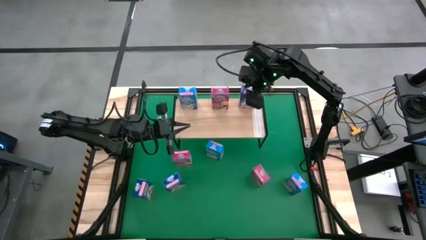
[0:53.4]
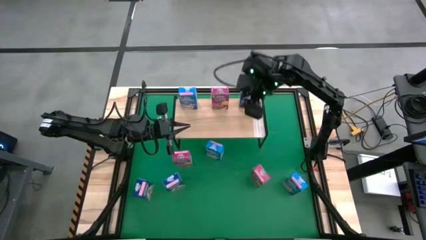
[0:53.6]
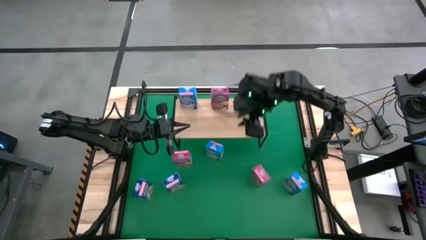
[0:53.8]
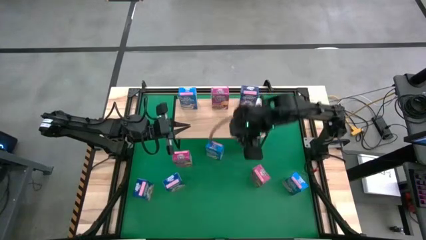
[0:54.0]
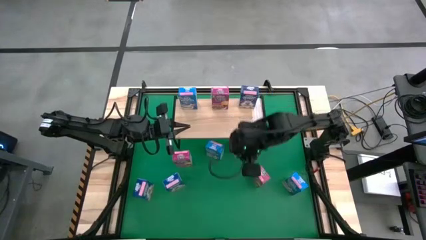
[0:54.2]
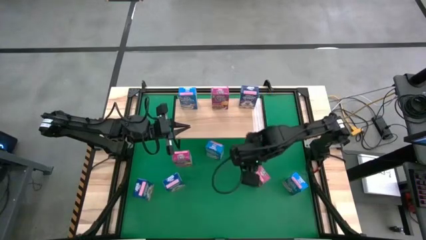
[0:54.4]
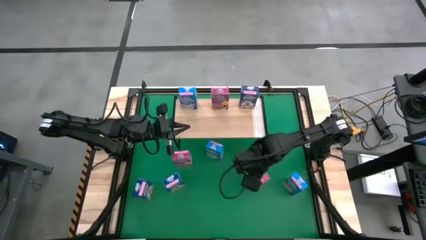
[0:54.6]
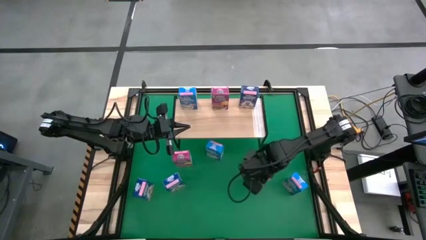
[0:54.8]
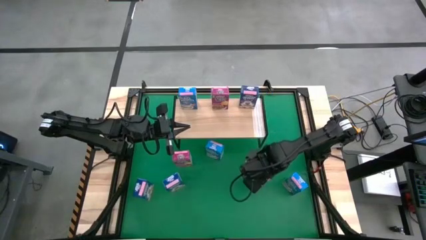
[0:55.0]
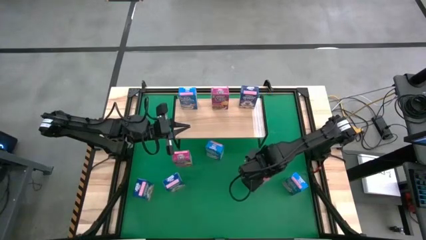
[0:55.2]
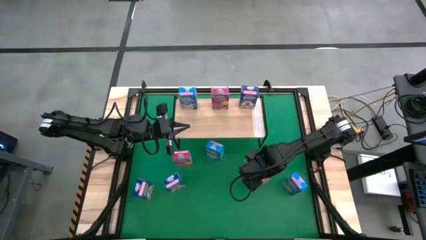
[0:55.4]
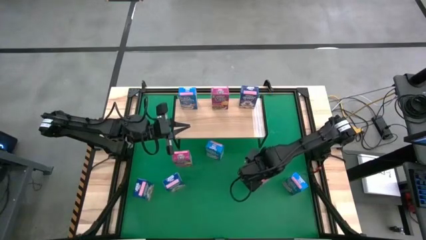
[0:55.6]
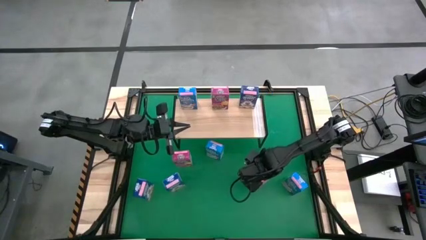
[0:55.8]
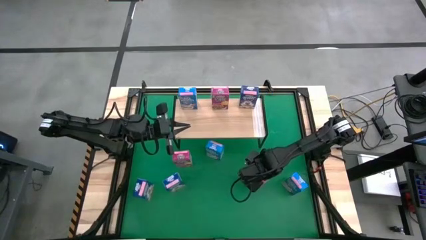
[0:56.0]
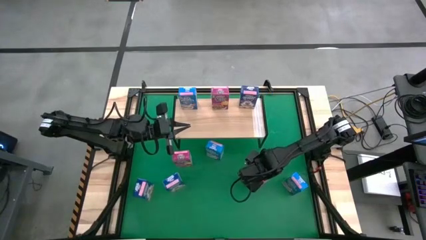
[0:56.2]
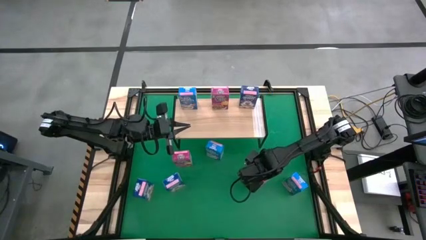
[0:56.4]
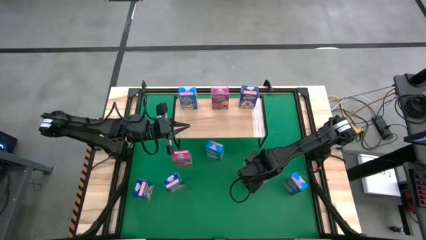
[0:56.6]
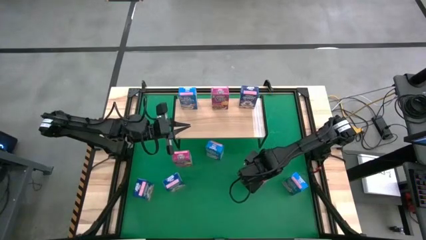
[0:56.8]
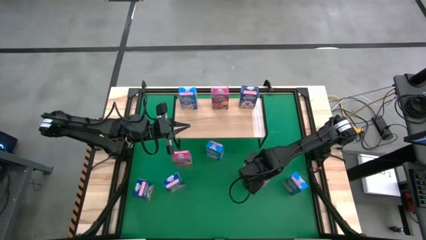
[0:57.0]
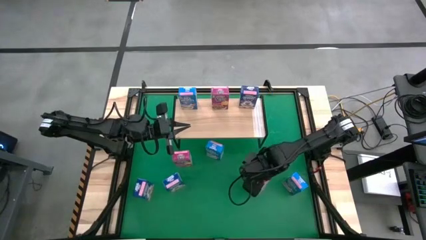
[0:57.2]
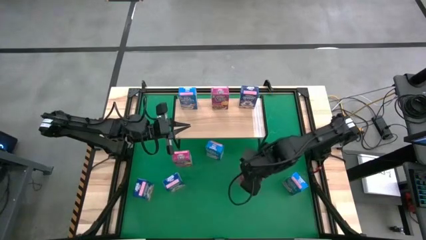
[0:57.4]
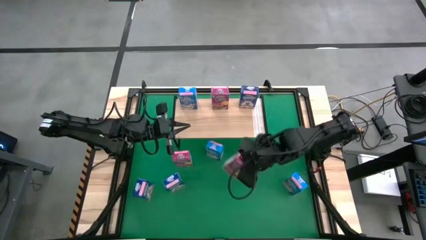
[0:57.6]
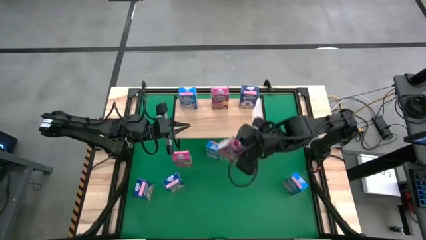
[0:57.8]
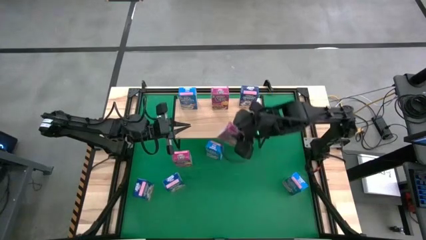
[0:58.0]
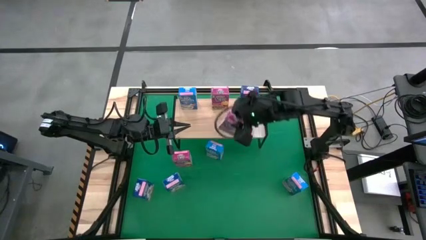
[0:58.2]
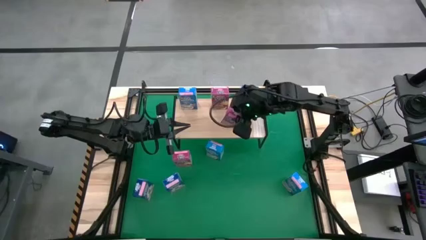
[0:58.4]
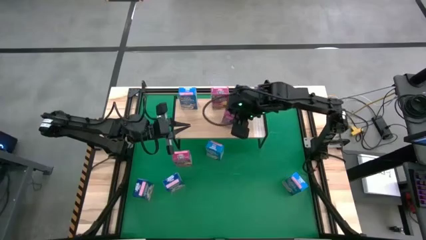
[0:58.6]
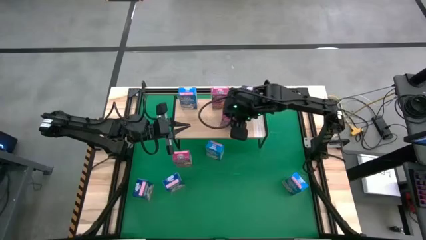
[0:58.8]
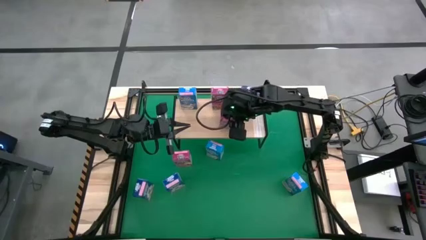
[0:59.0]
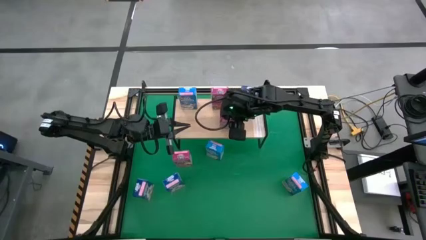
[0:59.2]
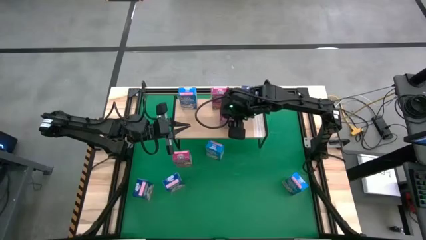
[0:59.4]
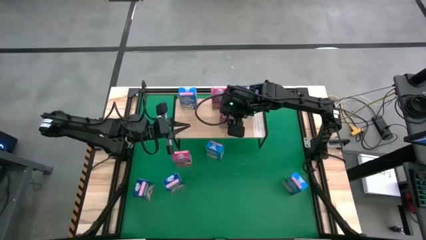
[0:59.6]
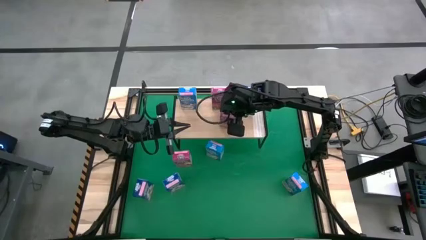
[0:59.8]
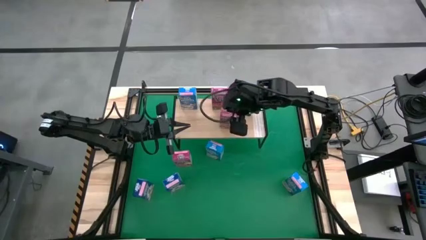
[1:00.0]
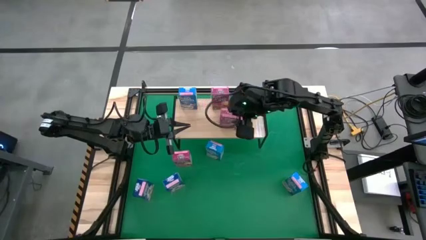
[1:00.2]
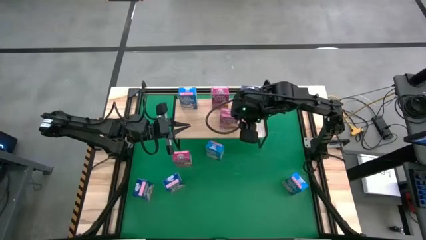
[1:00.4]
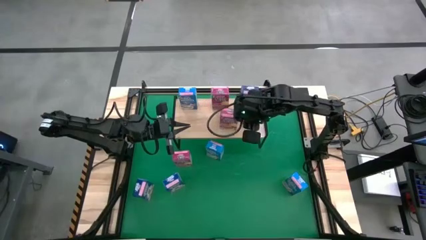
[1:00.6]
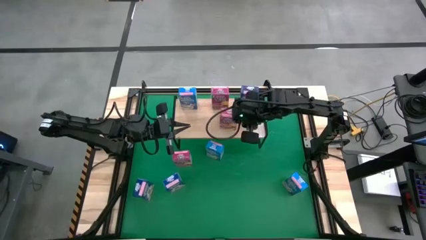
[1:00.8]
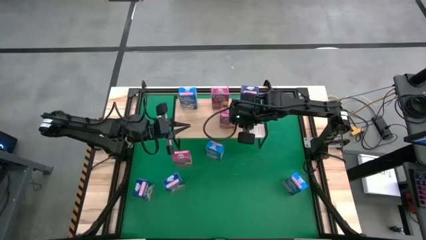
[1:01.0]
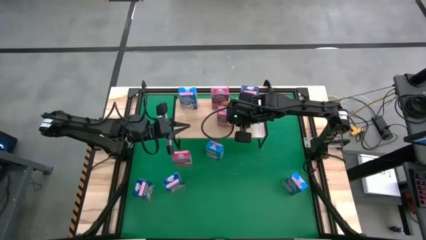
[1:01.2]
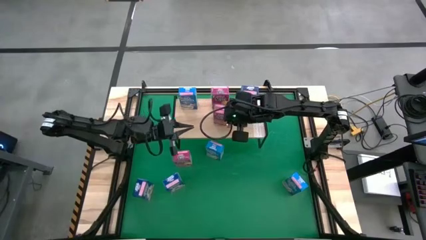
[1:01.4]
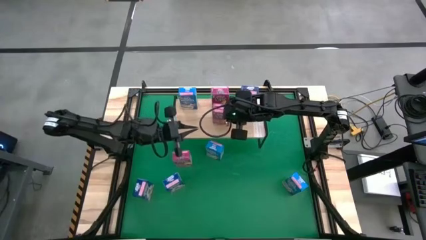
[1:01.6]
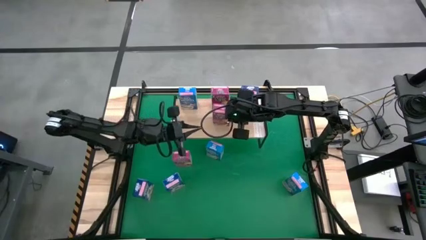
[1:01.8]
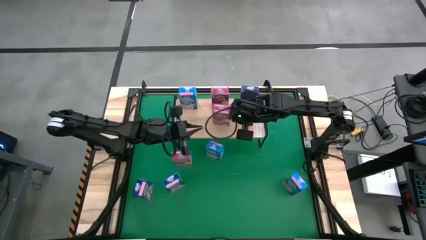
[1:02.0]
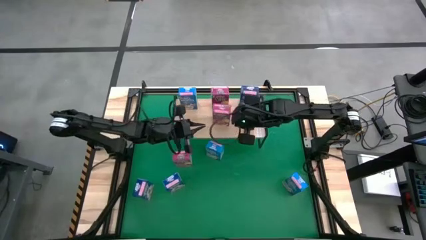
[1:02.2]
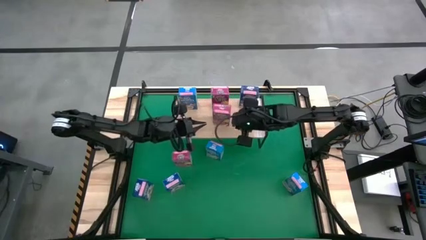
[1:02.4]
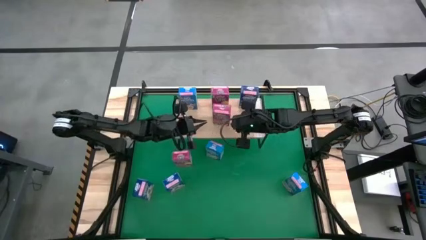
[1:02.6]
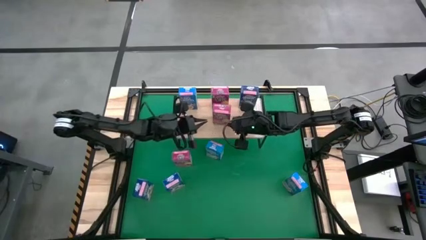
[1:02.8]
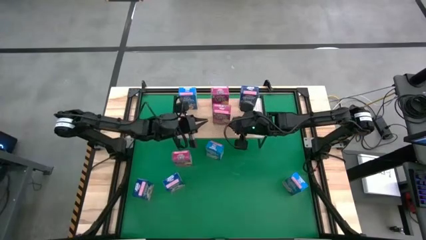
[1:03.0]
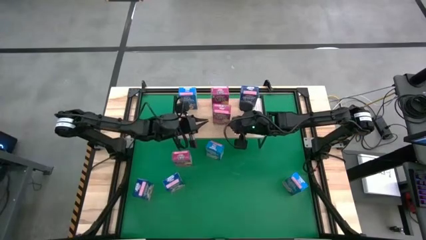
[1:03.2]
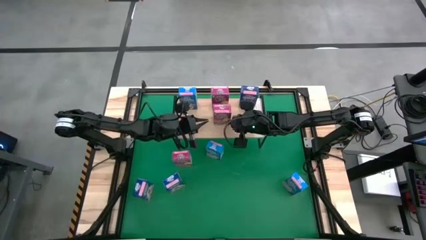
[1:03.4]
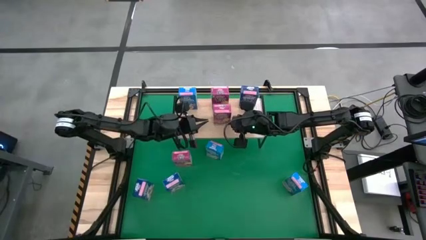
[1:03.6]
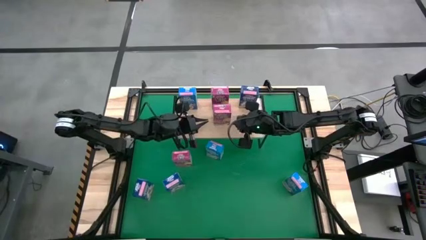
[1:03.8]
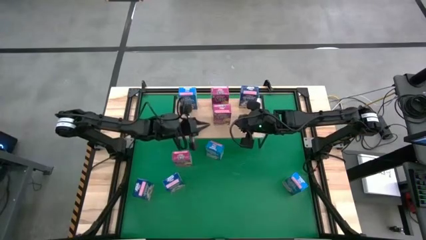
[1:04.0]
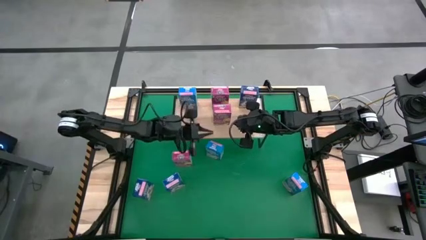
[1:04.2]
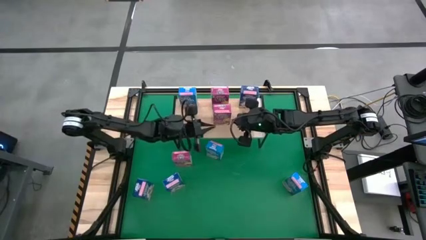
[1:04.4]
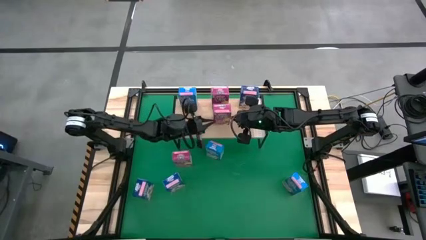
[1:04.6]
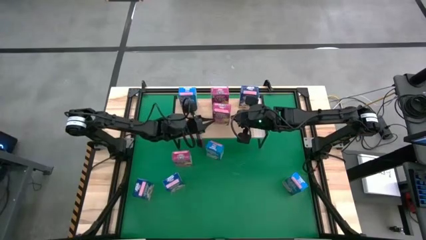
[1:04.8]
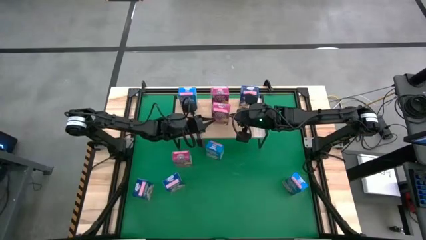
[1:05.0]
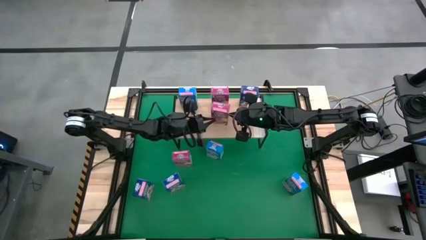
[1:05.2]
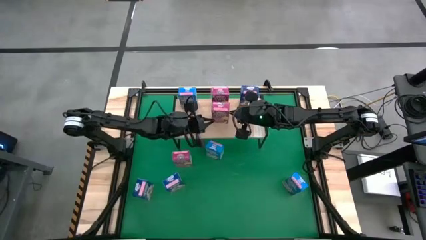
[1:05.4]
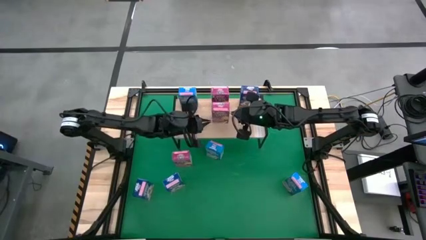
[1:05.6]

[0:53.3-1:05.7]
Task: Stack cereal on shelf
Put the right violet cereal box, aligned with the other violet cereal box on the shelf

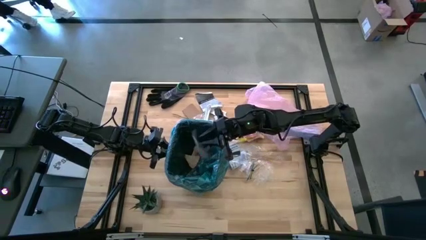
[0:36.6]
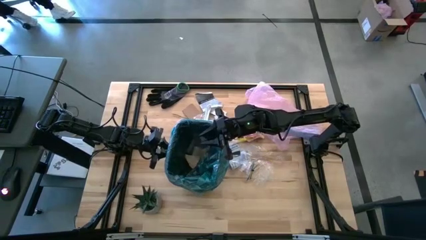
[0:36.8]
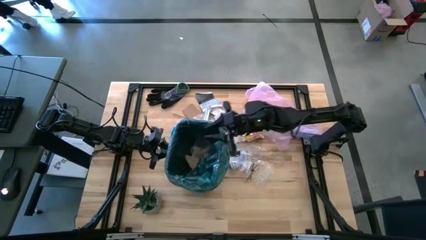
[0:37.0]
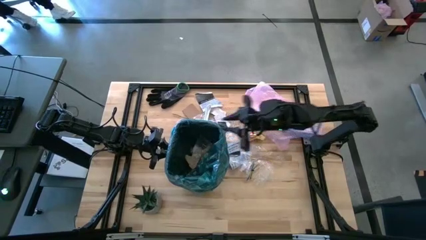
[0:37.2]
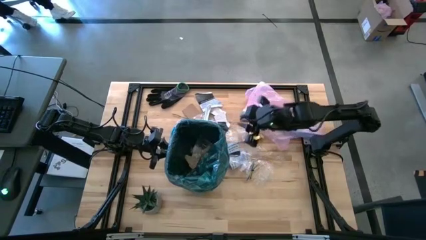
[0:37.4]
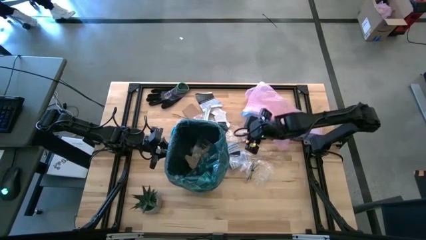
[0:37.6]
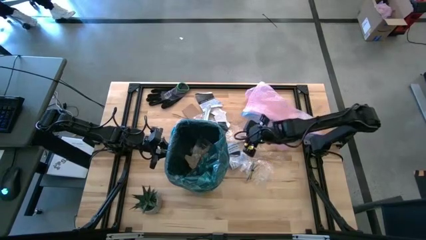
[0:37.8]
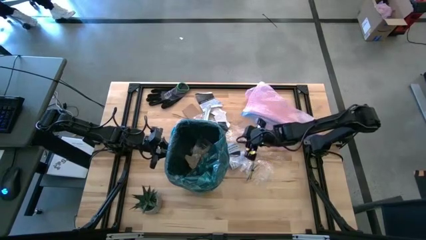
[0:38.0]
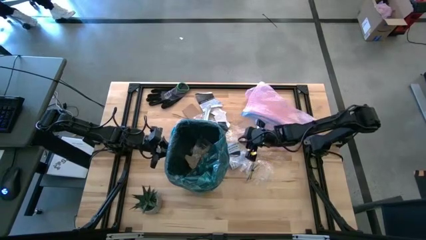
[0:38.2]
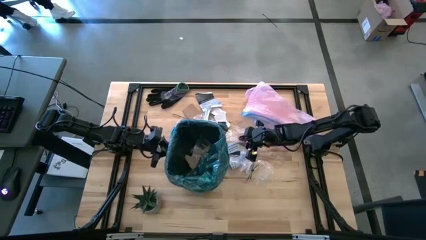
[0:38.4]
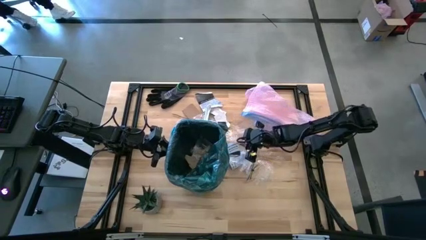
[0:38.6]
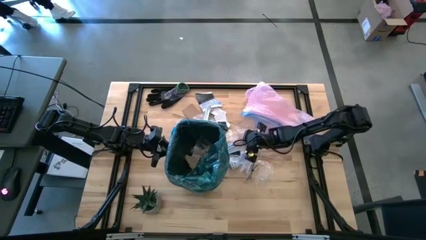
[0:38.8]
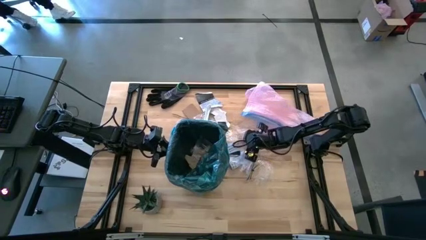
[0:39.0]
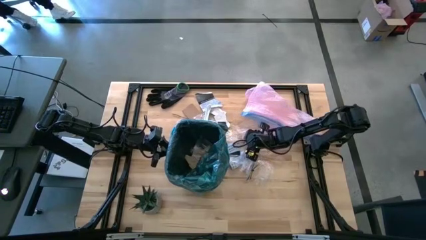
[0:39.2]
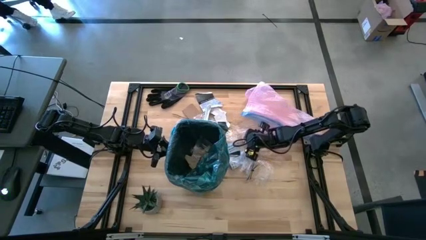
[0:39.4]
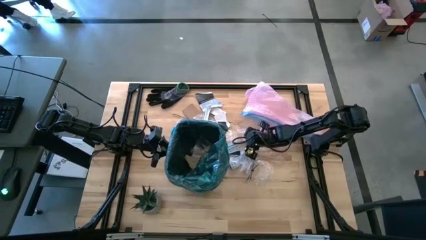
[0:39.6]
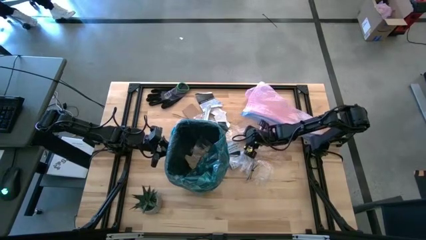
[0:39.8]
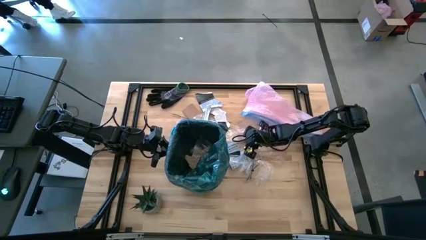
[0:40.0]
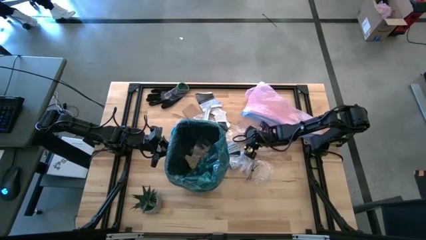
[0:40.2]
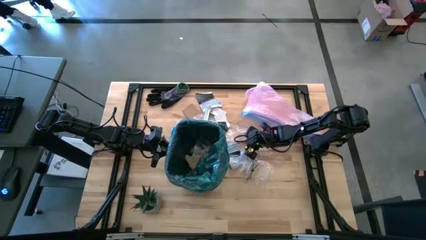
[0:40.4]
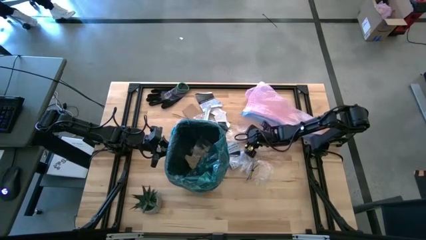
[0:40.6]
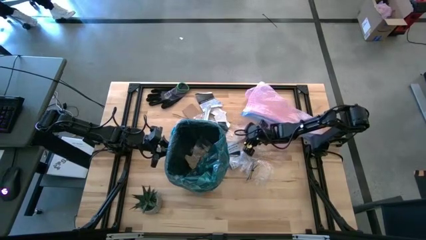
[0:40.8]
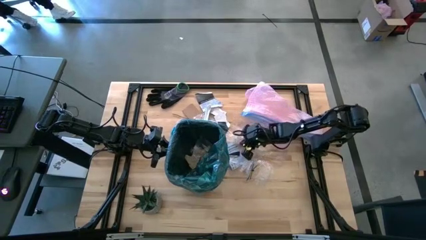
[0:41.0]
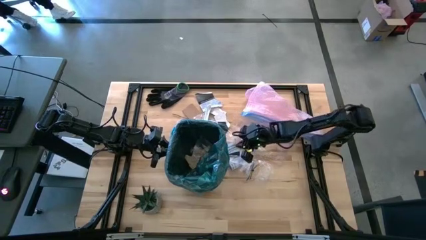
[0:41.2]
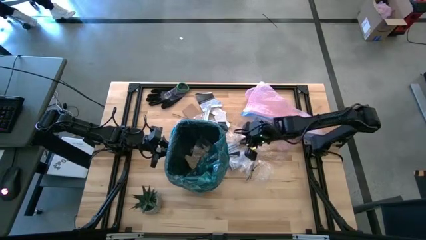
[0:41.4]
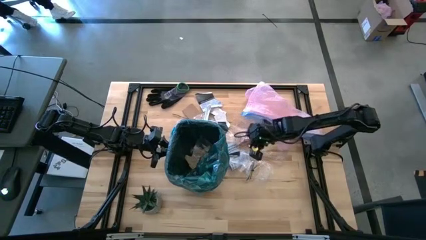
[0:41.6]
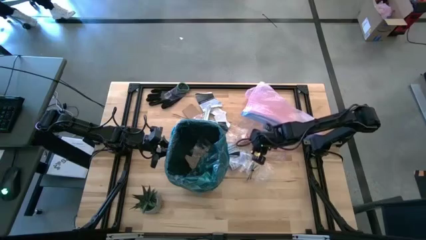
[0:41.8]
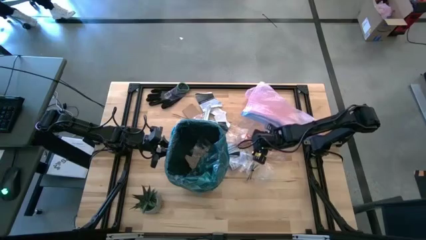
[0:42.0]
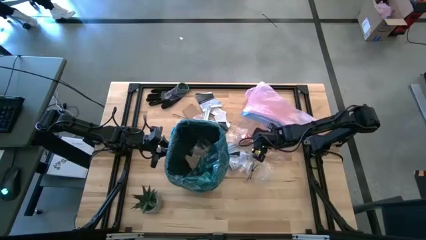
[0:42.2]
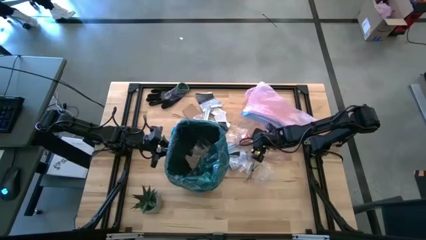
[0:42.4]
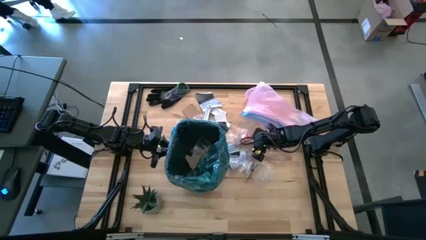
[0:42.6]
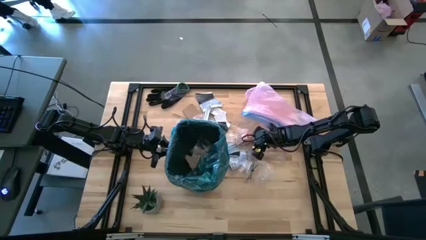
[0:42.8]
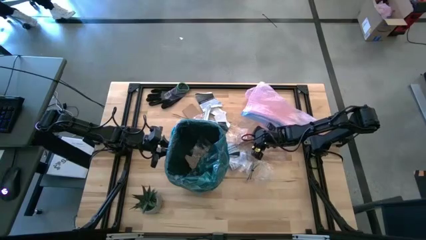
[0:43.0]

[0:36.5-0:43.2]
Task: place trash/remove bag and relplace
Put the brown paper into the trash bin
